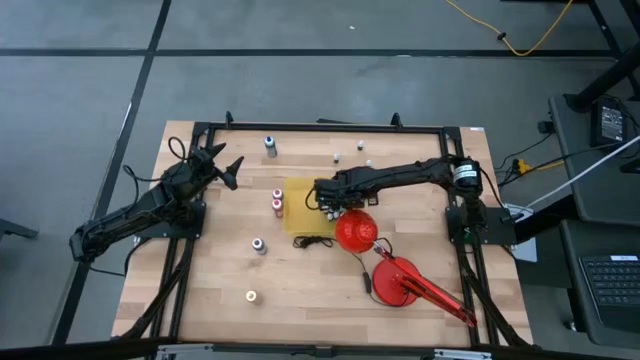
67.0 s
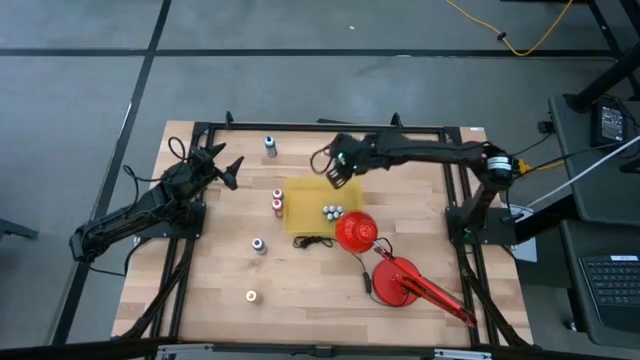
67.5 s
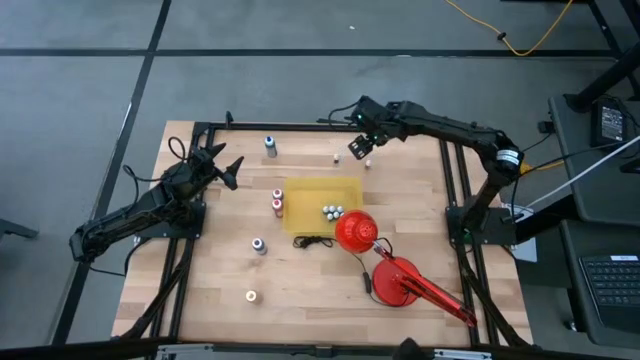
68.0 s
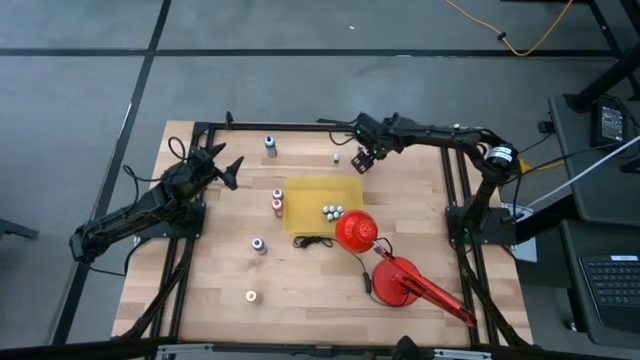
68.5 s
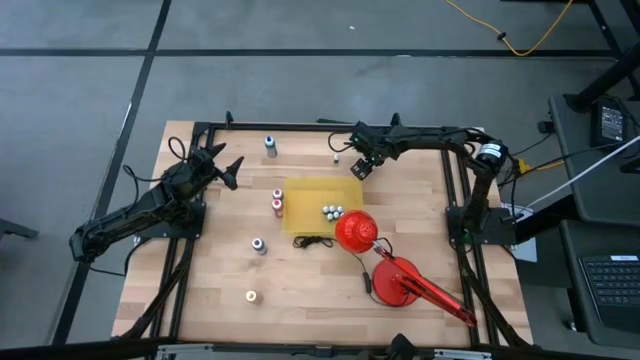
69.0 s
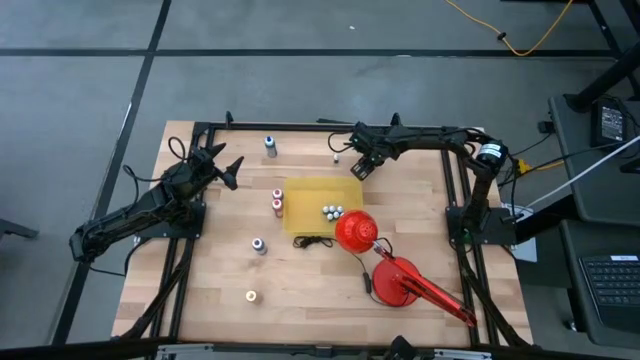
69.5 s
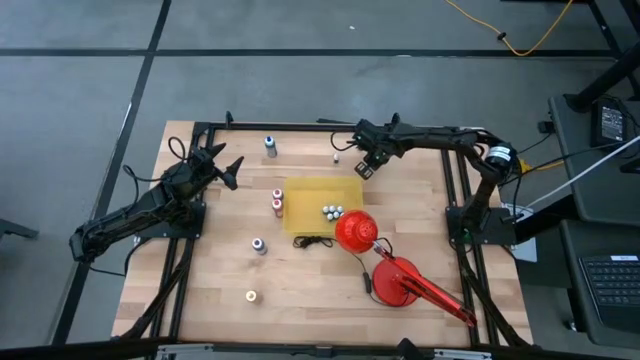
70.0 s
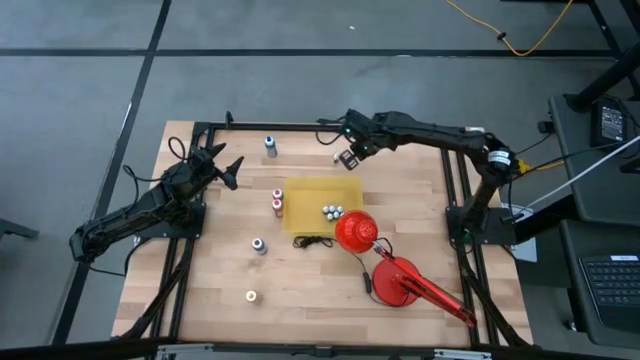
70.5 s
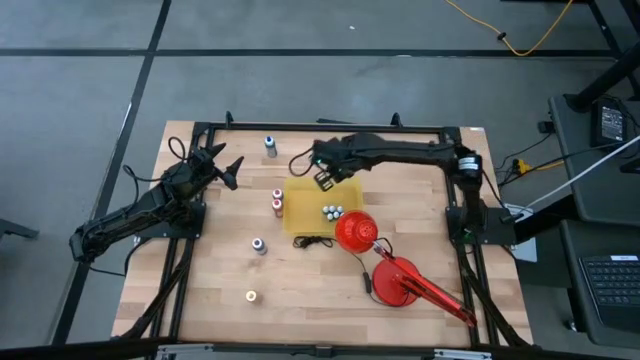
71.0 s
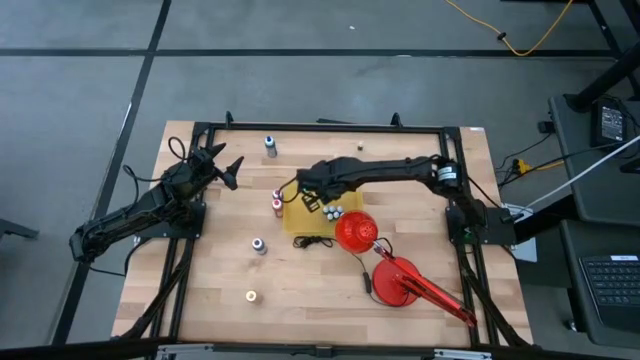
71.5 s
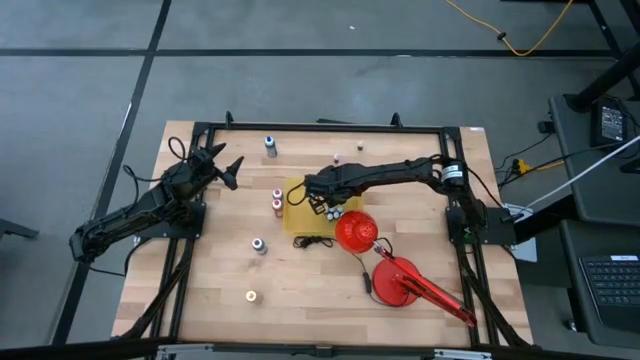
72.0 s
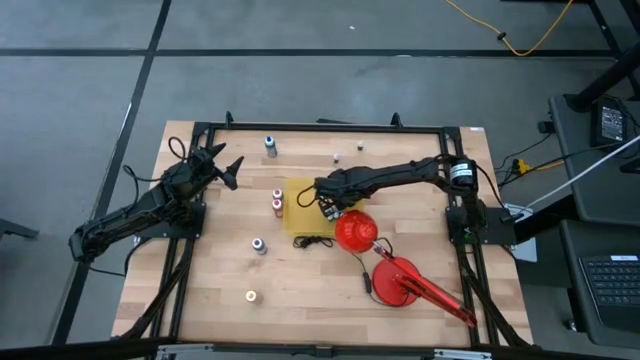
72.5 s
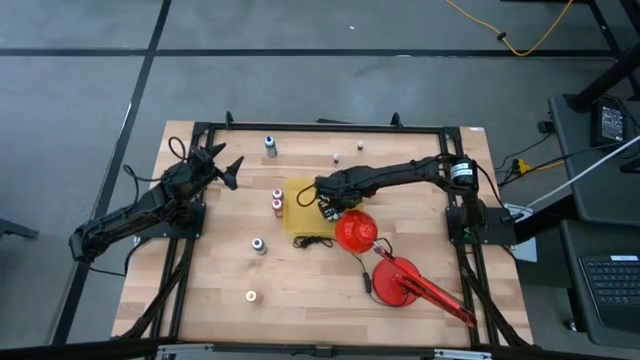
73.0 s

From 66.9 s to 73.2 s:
Task: Pick & Place food coloring
Put the right small red food coloring bottle into the yellow container

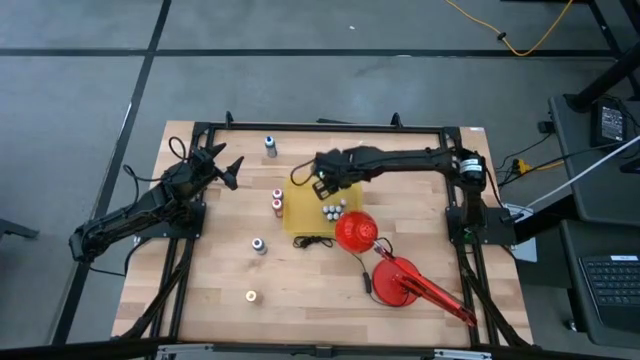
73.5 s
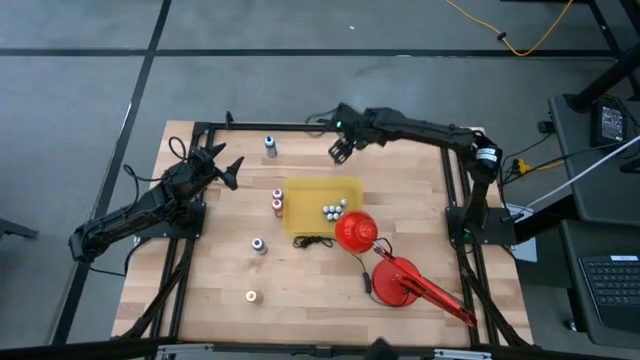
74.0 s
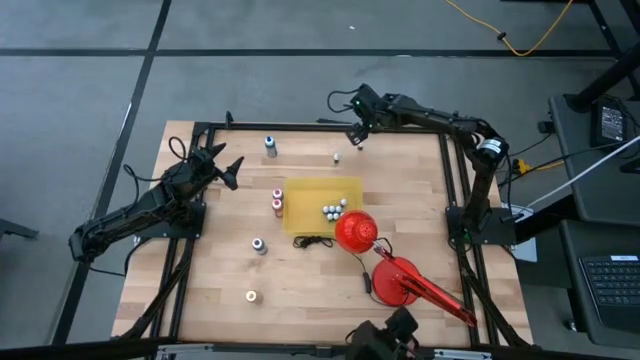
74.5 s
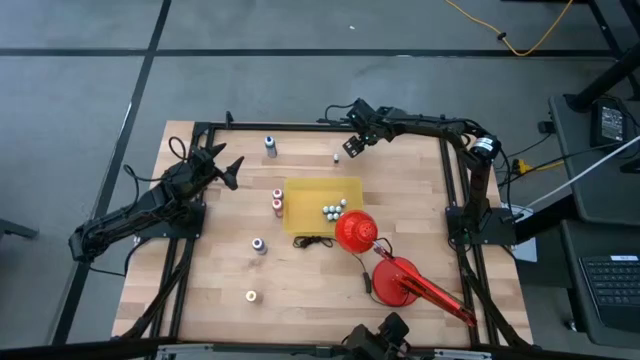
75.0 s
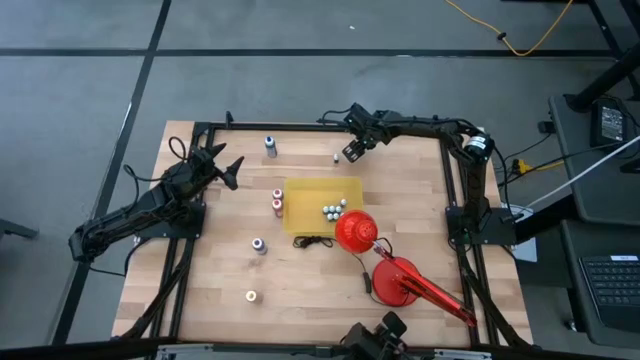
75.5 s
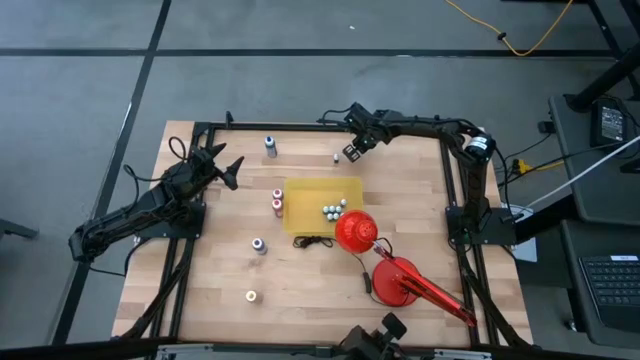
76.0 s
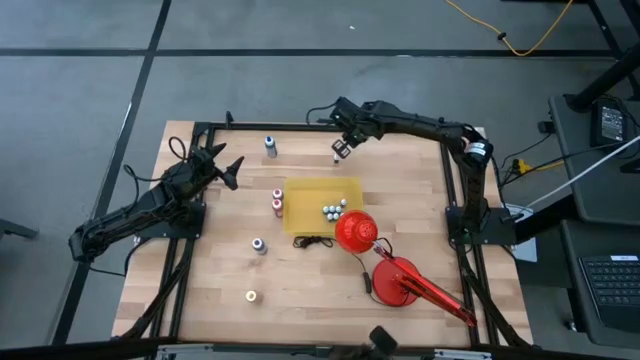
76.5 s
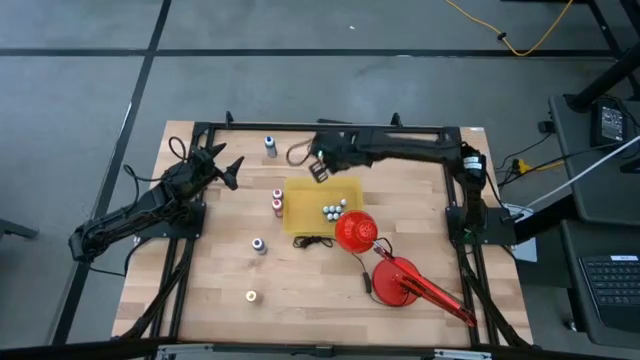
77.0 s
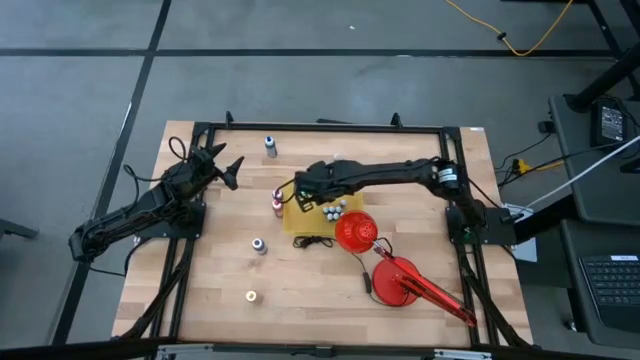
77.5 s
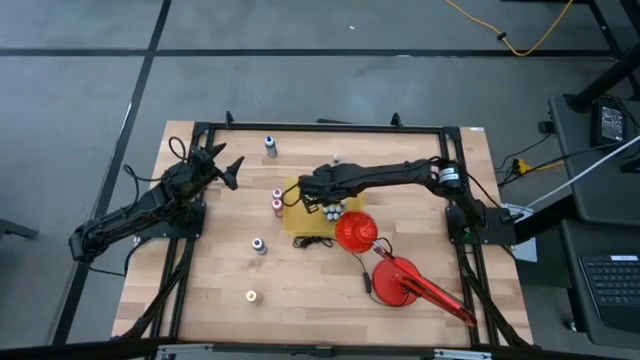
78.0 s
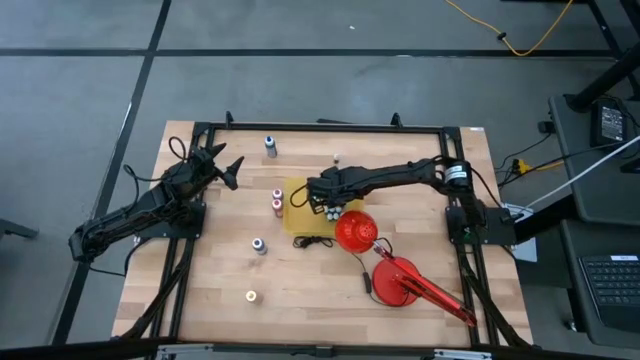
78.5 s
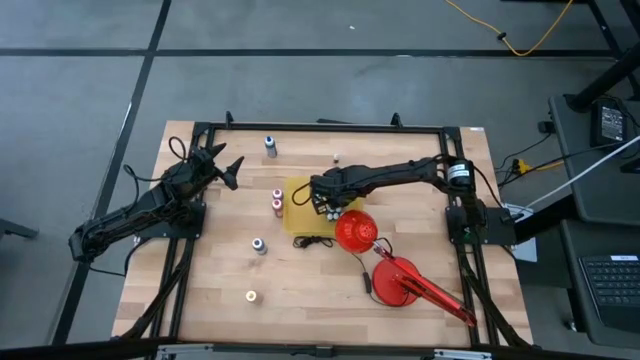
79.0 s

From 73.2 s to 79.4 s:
Put the small brown food coloring bottle into the yellow container

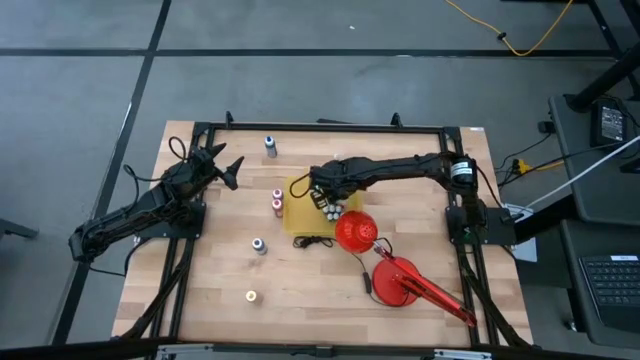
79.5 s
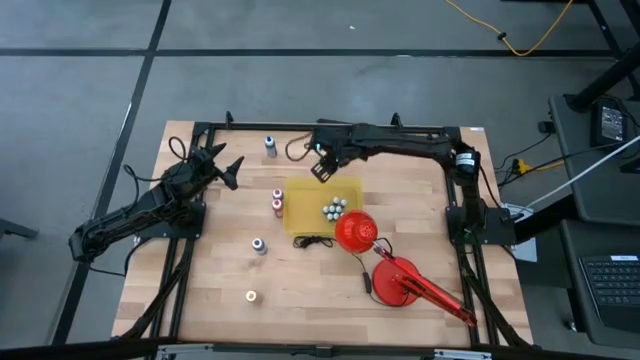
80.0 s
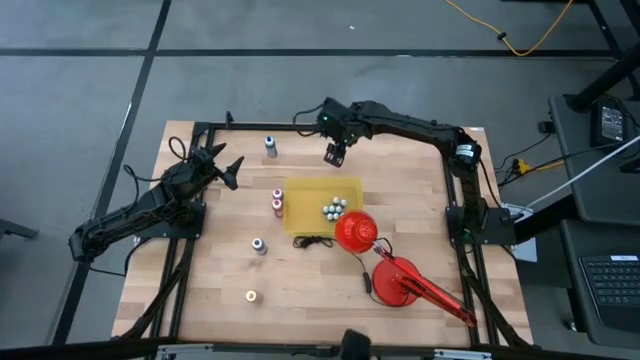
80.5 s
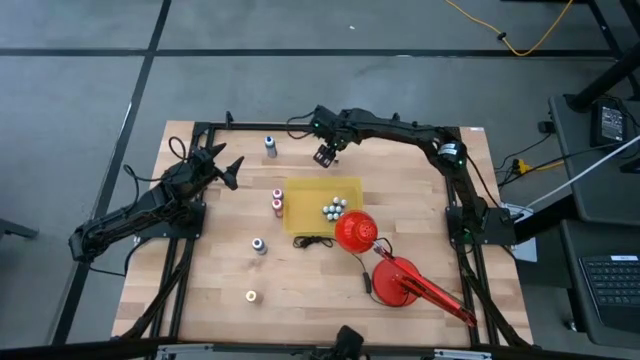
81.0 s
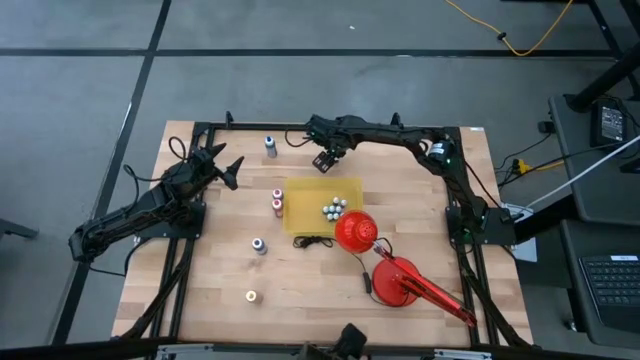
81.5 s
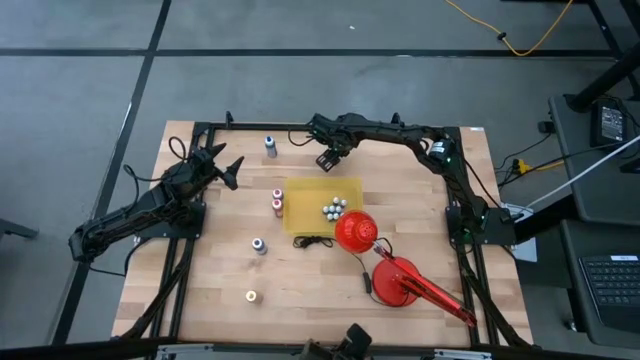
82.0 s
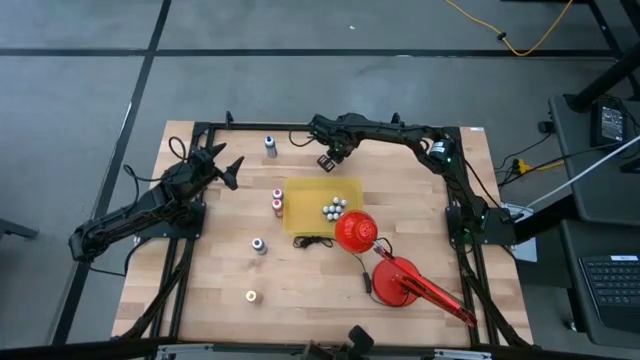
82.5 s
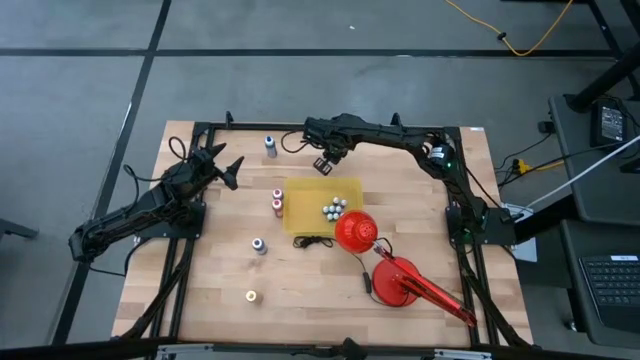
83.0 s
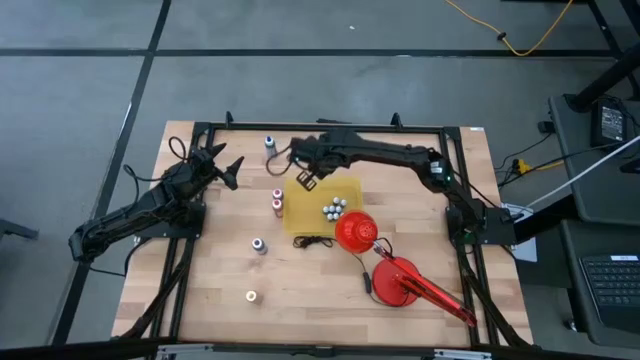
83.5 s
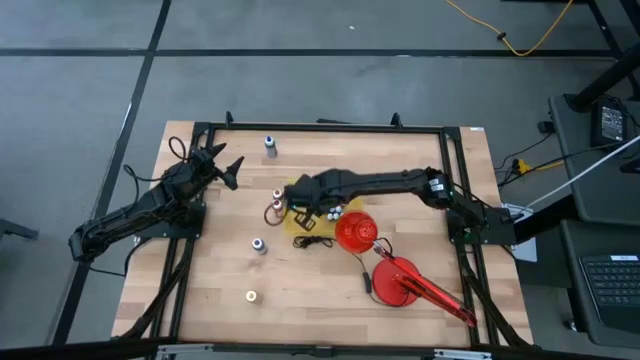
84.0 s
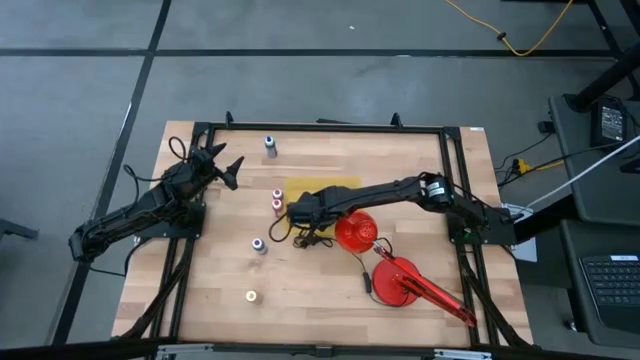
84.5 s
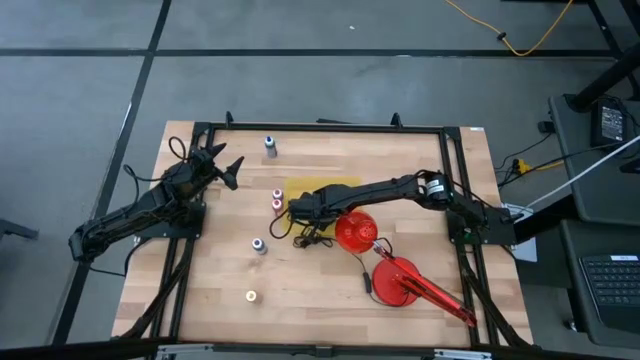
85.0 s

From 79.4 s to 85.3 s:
Put the small red food coloring bottle into the yellow container

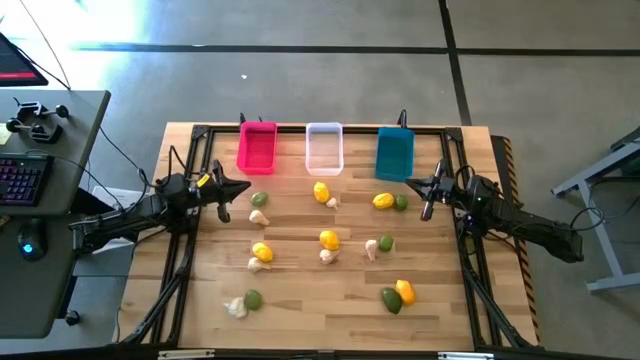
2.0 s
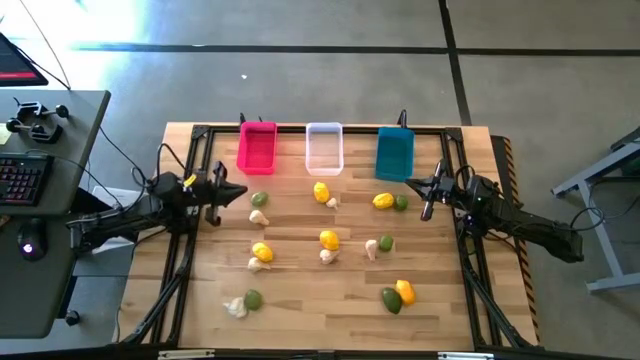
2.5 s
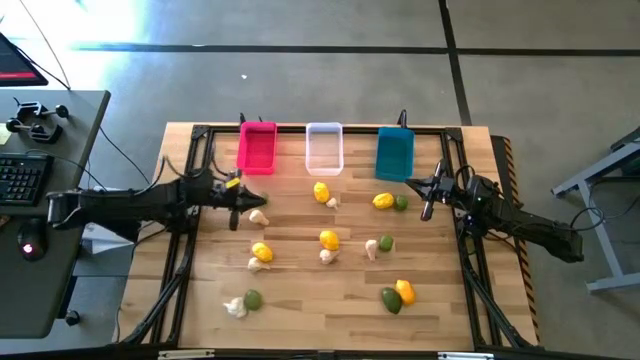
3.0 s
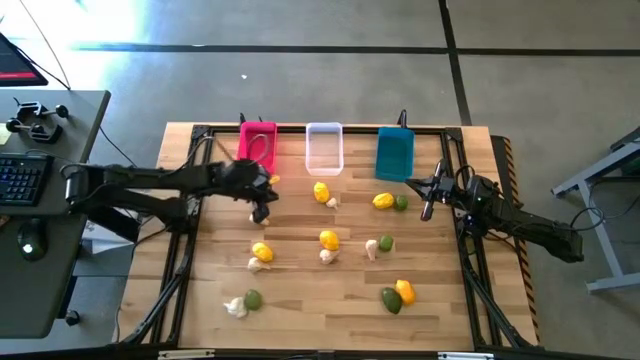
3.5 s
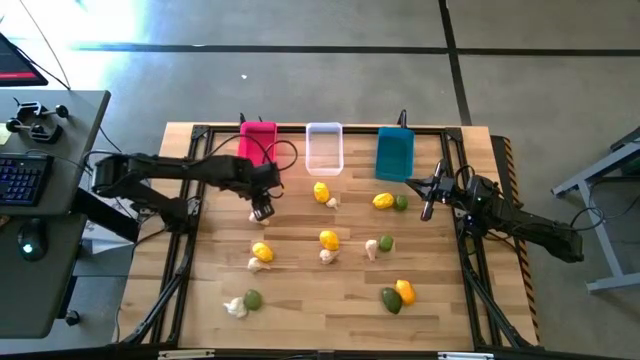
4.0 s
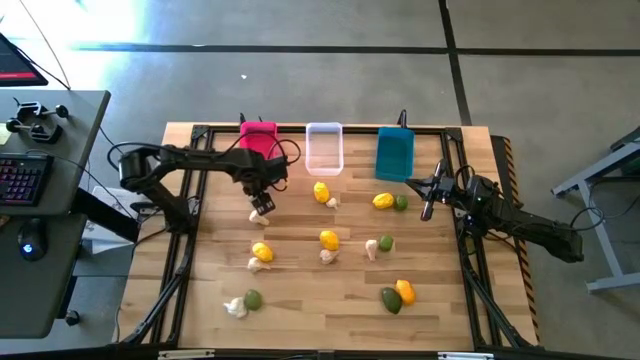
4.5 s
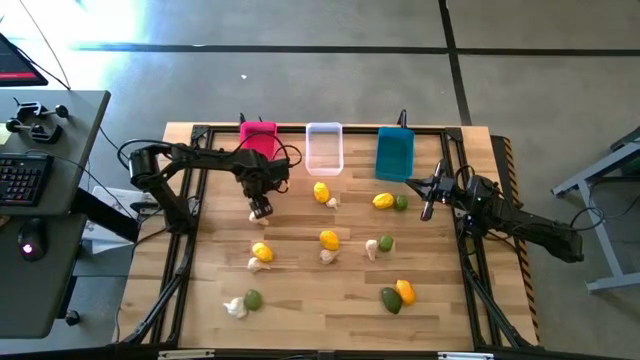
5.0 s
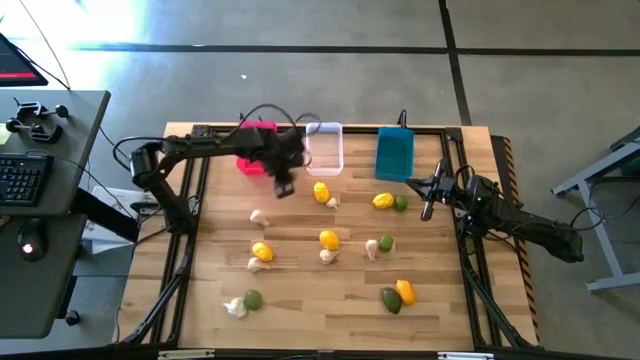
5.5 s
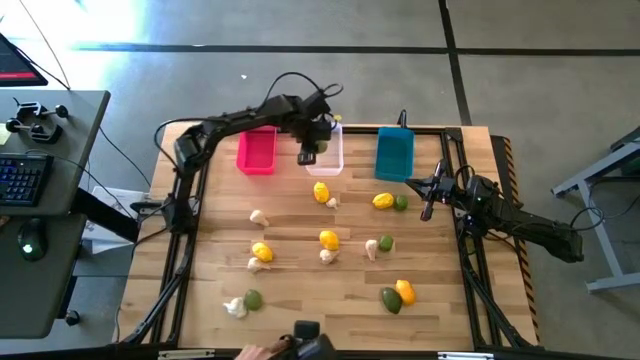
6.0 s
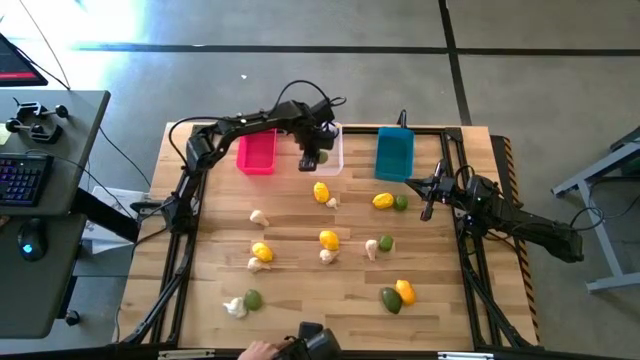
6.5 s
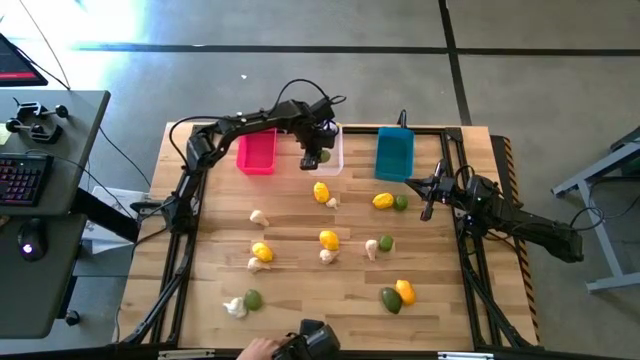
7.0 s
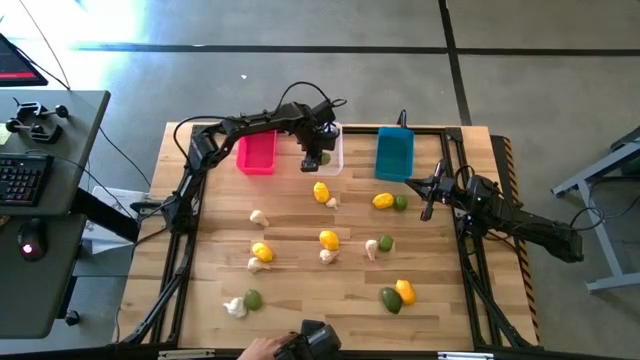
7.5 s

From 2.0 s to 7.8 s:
Task: Sort produce into baskets
Put the lime into the transparent bin
